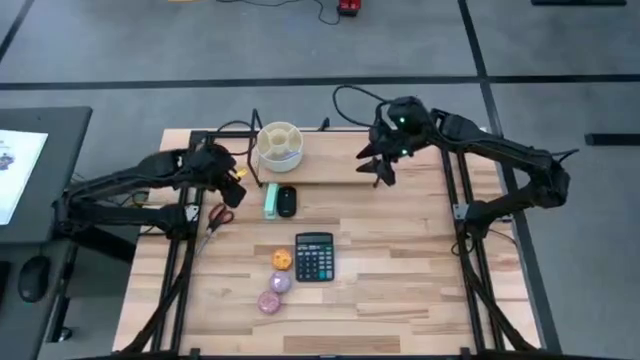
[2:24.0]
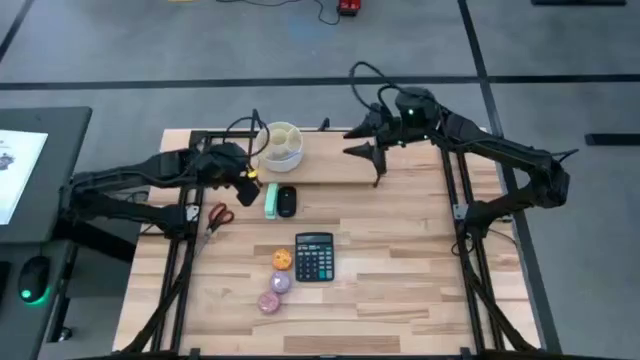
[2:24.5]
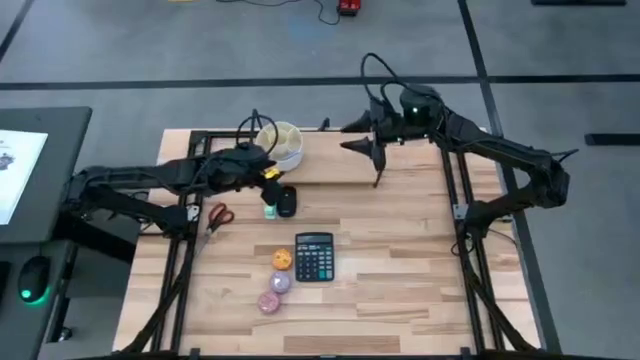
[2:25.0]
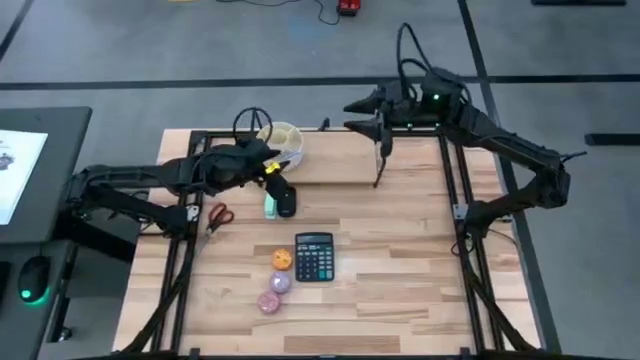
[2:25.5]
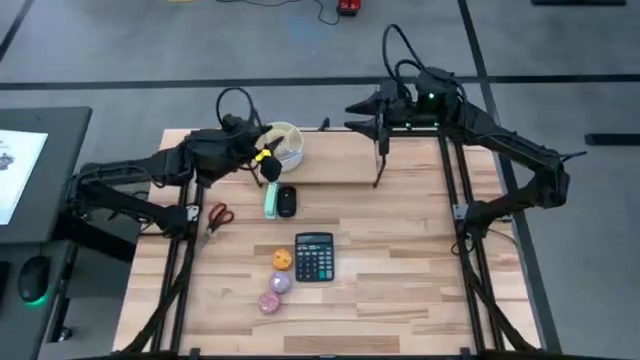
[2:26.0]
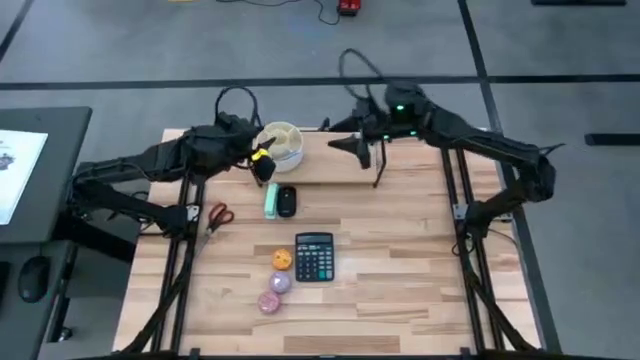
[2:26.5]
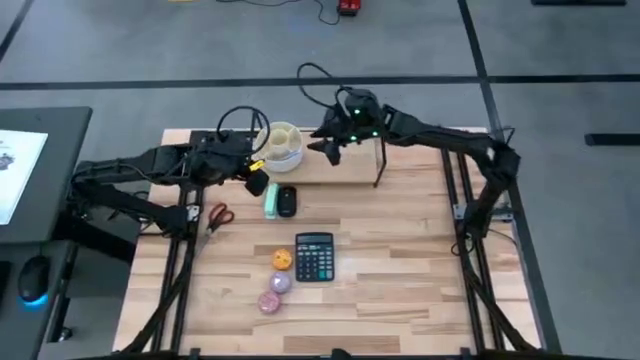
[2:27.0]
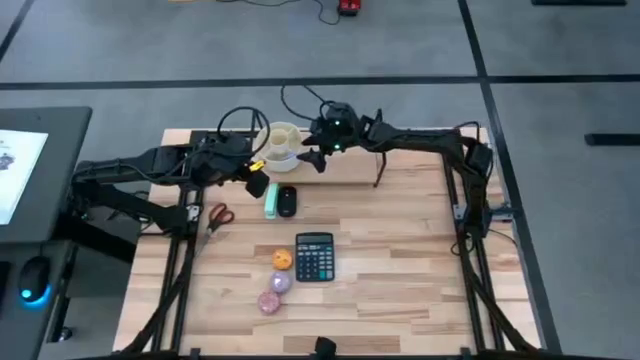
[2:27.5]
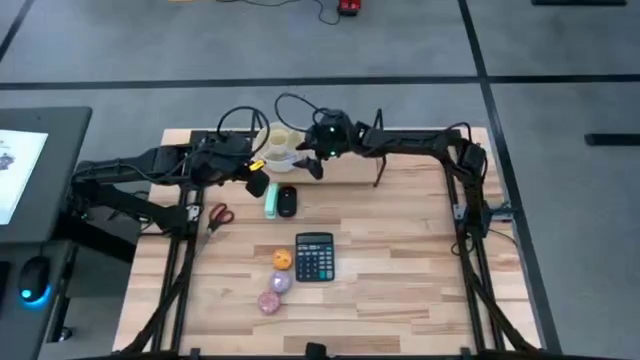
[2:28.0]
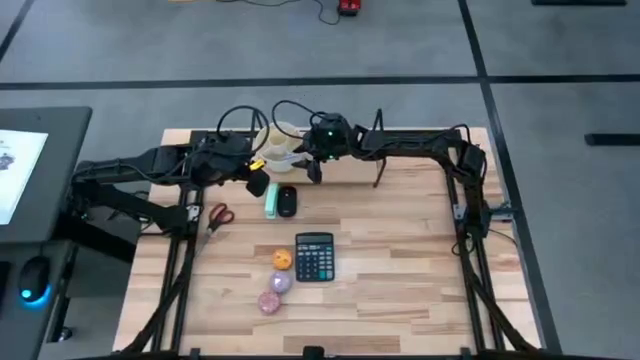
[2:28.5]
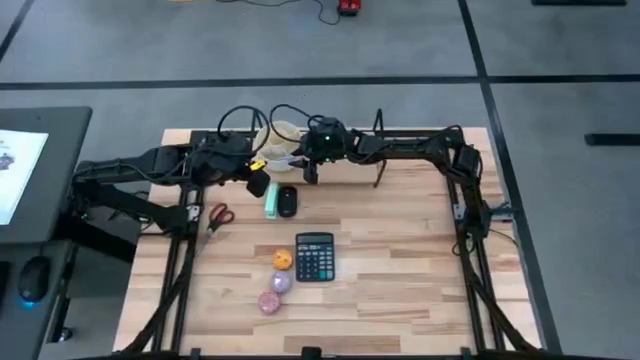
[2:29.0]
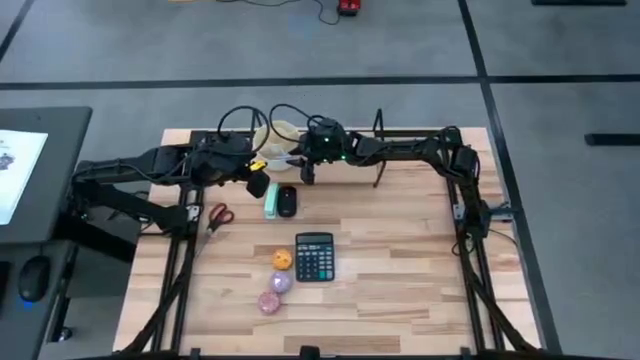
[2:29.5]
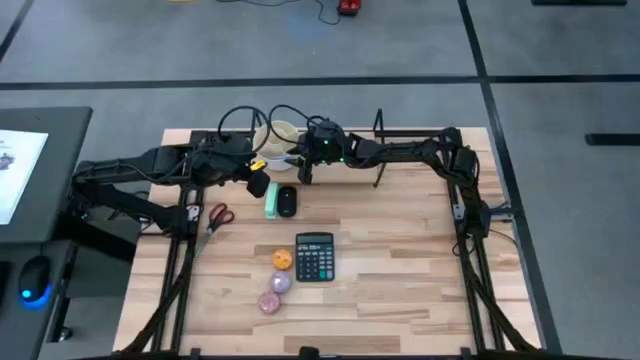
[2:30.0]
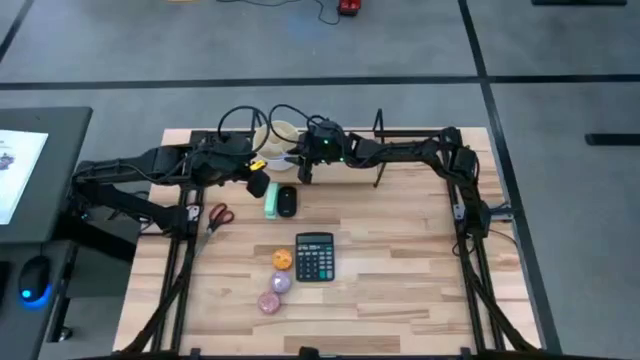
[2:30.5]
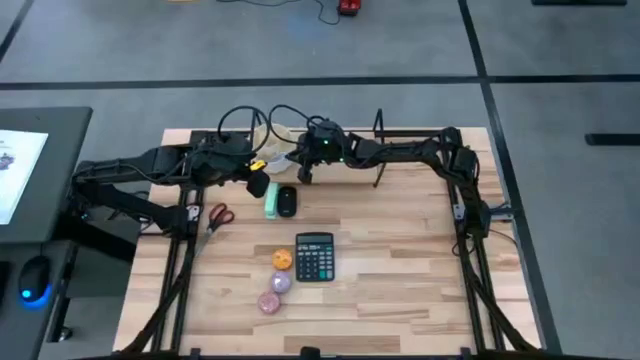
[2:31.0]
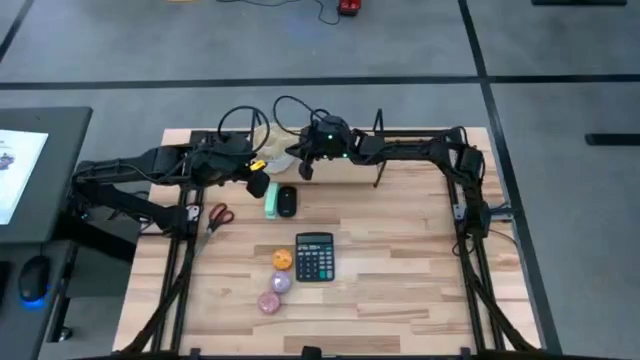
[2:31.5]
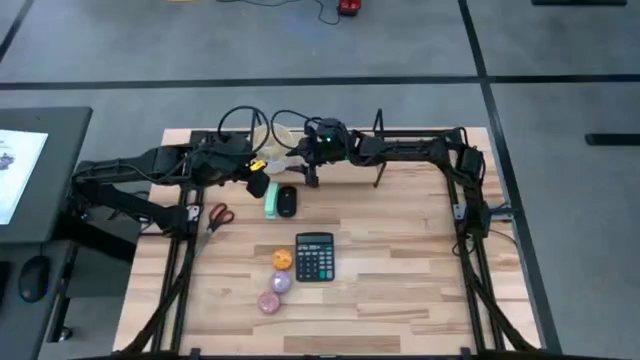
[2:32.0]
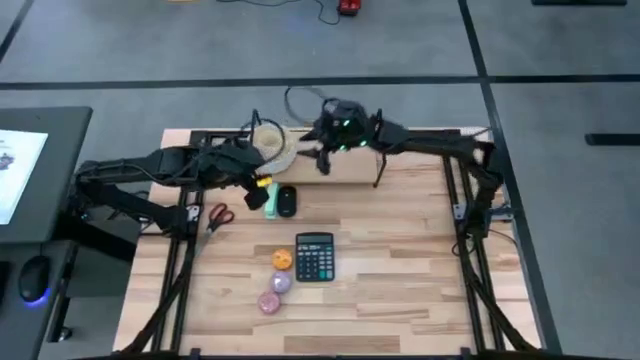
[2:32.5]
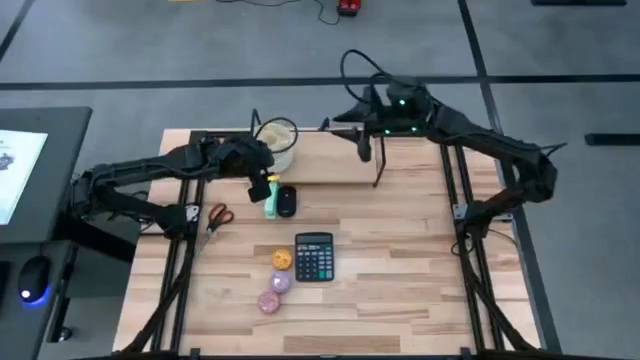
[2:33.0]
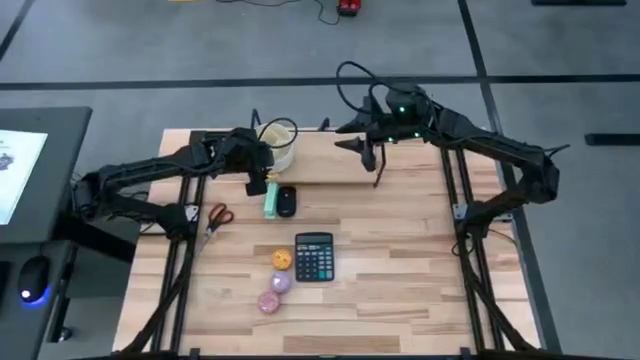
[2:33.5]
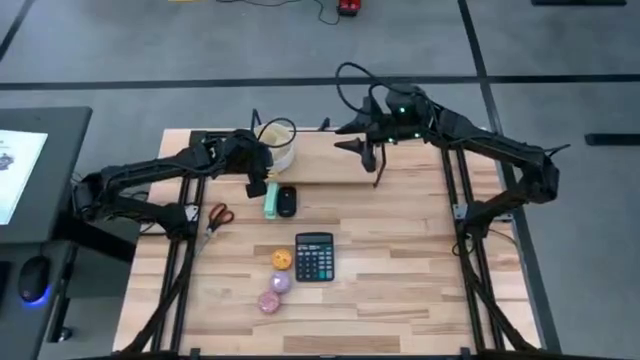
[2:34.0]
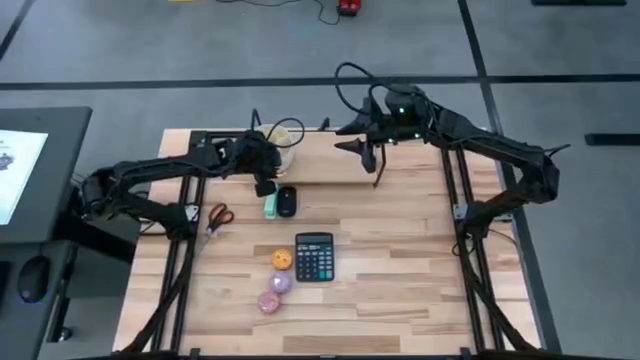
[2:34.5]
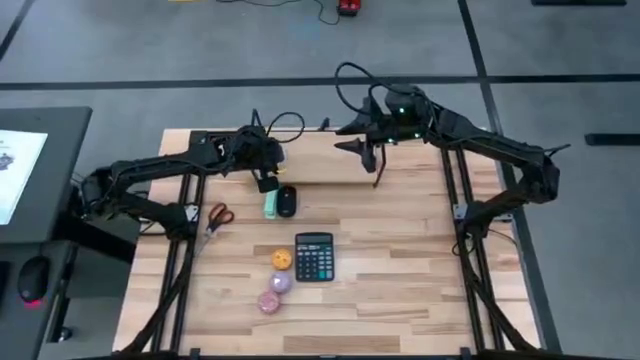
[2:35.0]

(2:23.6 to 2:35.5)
Task: Stock shelves
Remove the gray pen from the white pen organizer

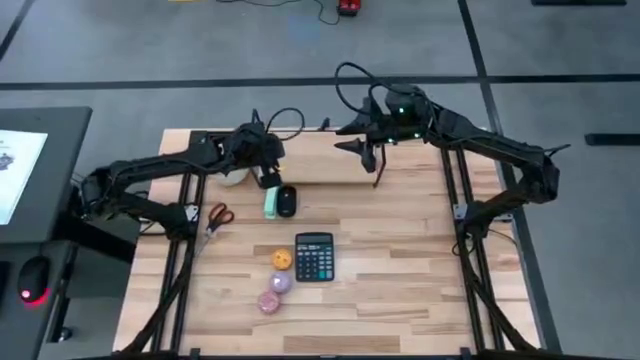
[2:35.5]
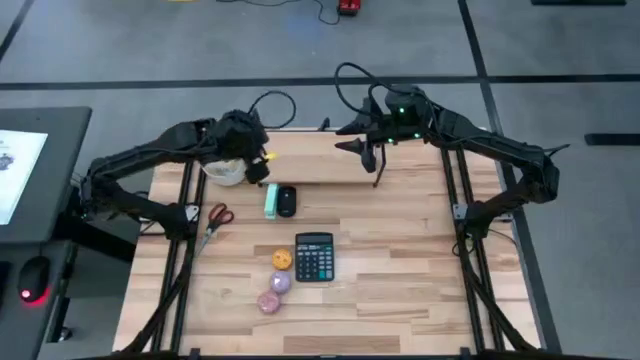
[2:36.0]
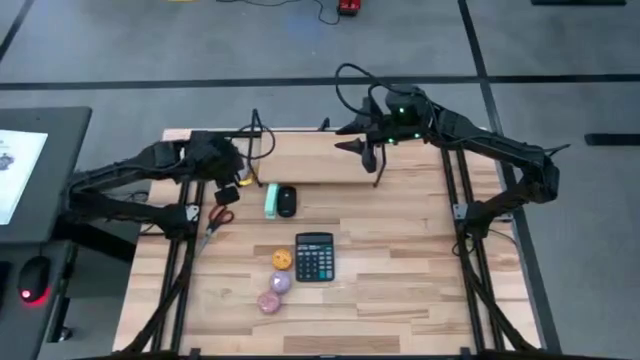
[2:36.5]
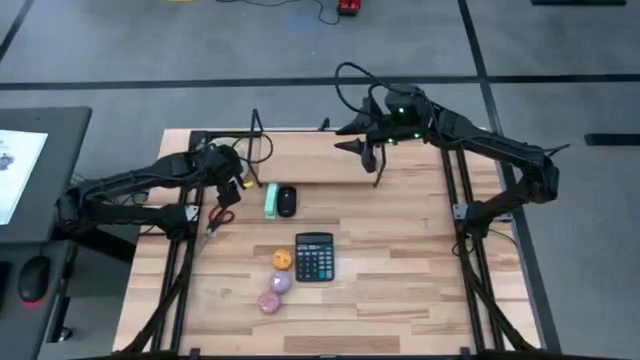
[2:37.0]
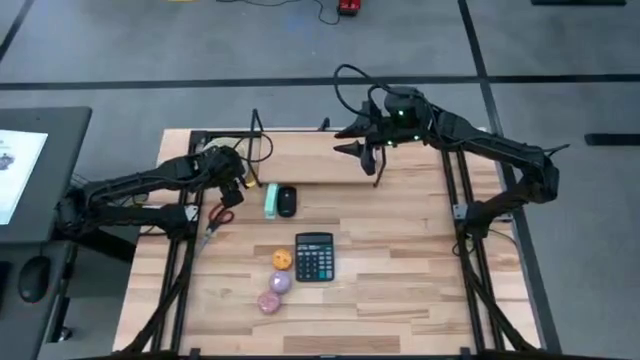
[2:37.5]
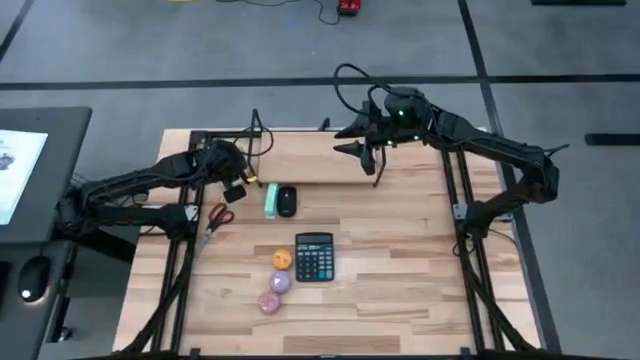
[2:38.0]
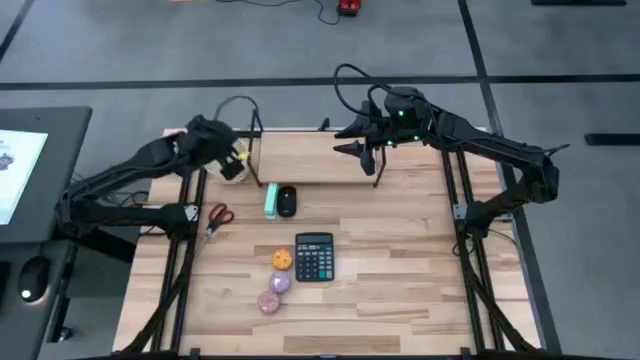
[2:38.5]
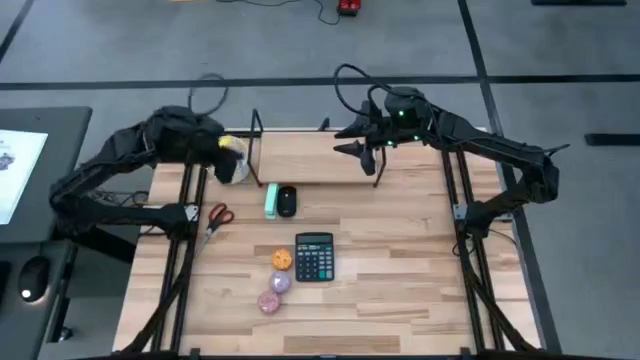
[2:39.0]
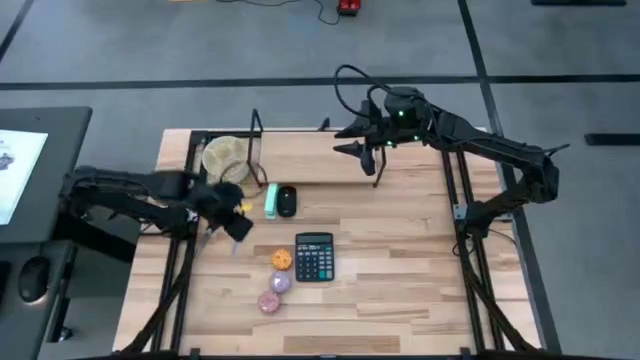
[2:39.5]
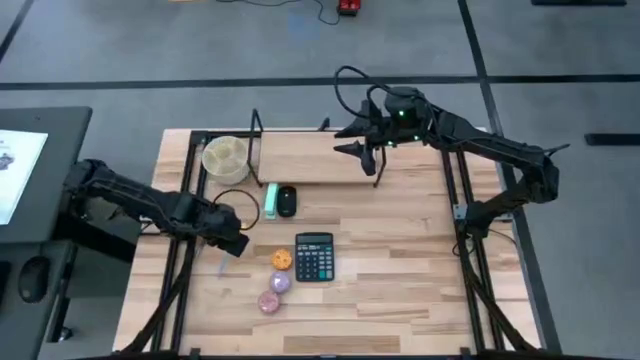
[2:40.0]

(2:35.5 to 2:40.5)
Remove the gray pen from the white pen organizer

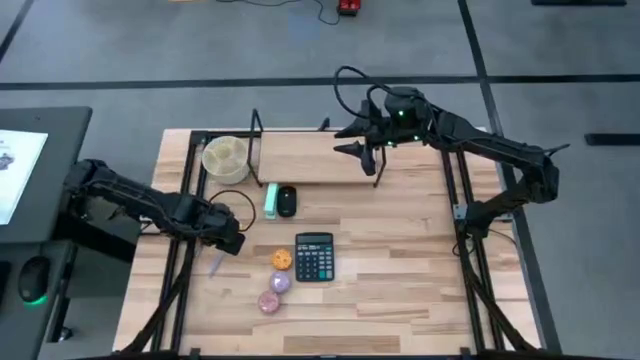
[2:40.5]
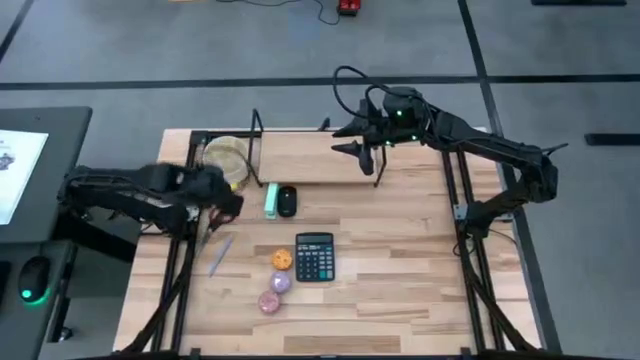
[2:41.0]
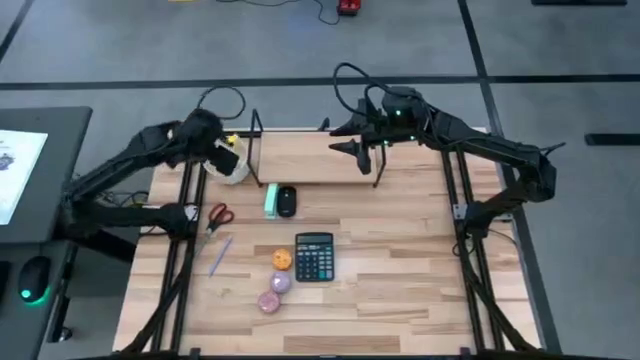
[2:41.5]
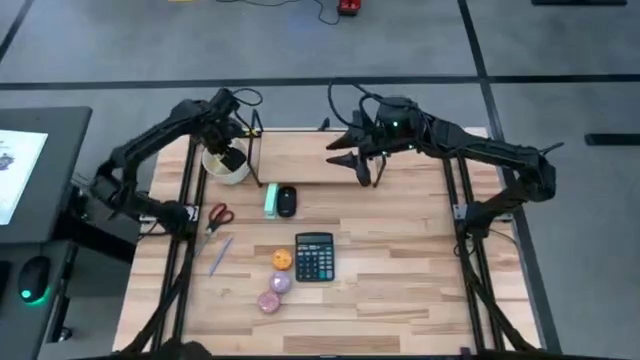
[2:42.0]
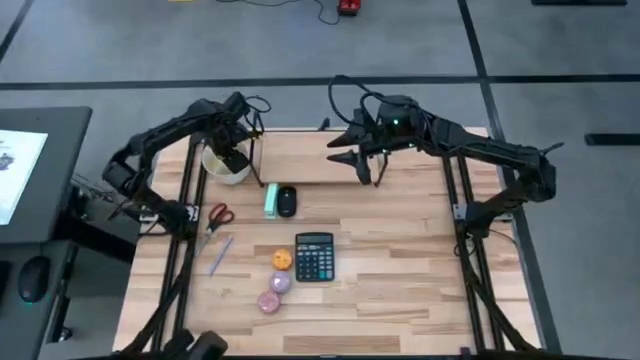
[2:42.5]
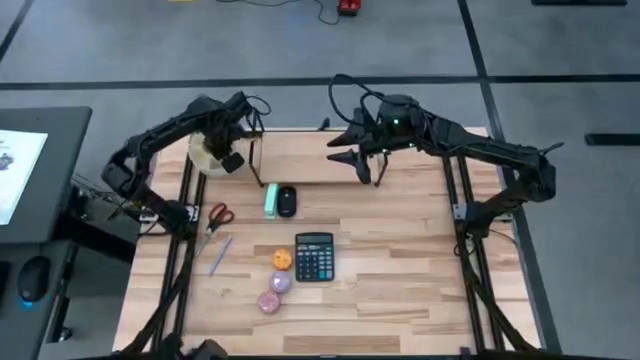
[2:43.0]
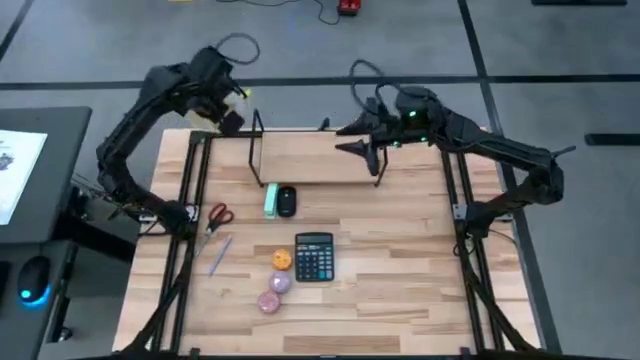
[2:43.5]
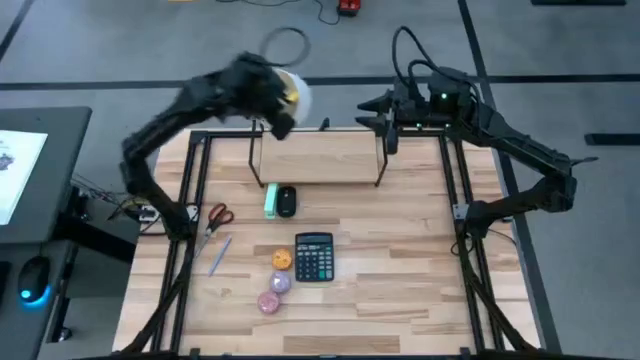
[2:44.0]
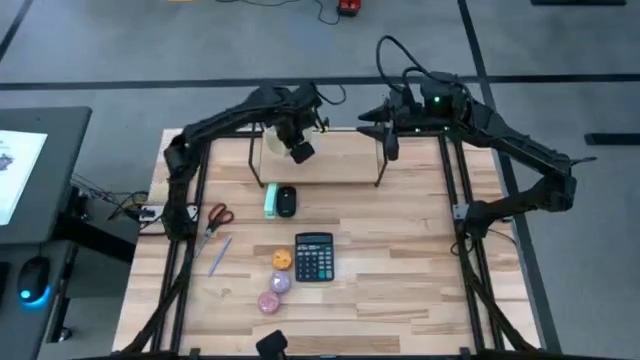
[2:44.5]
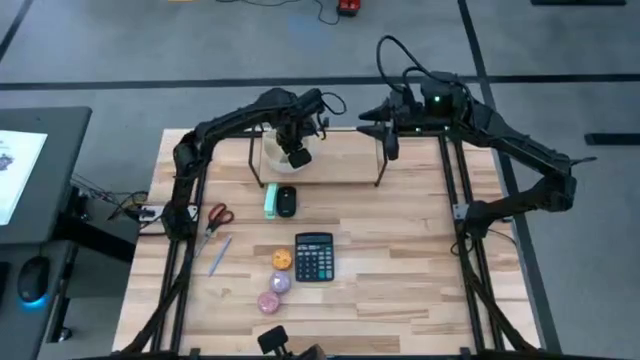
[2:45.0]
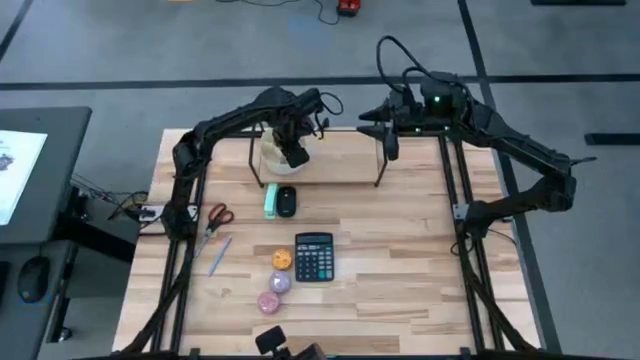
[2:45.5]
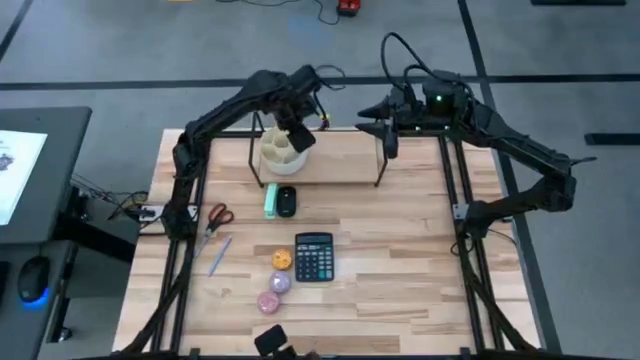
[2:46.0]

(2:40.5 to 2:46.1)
Put the white pen organizer on the shelf
